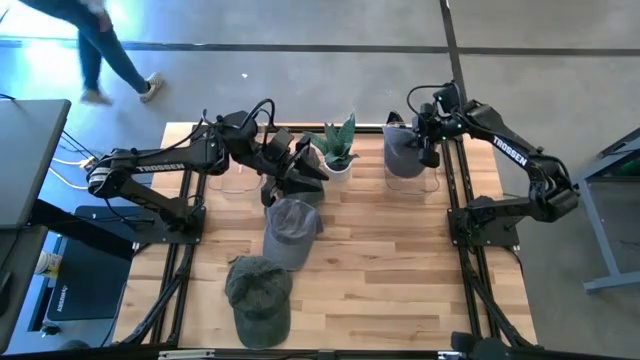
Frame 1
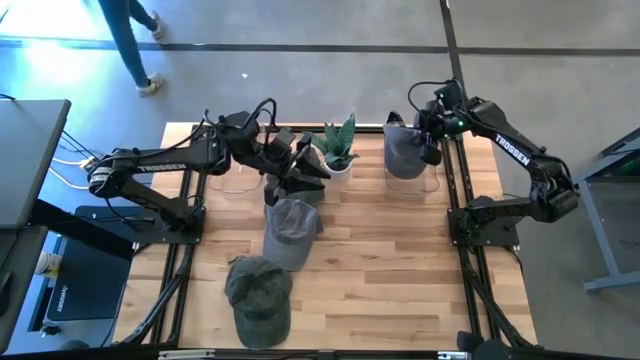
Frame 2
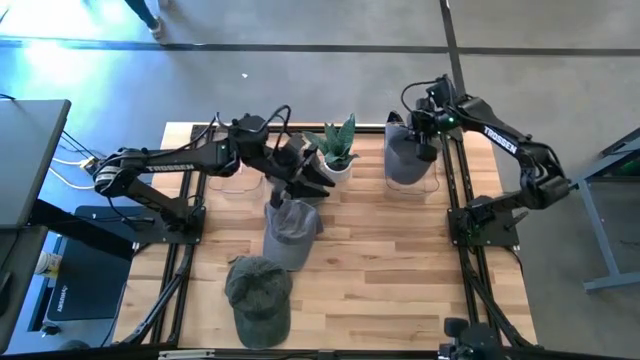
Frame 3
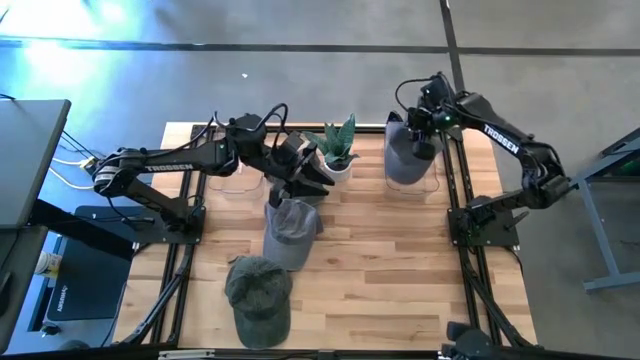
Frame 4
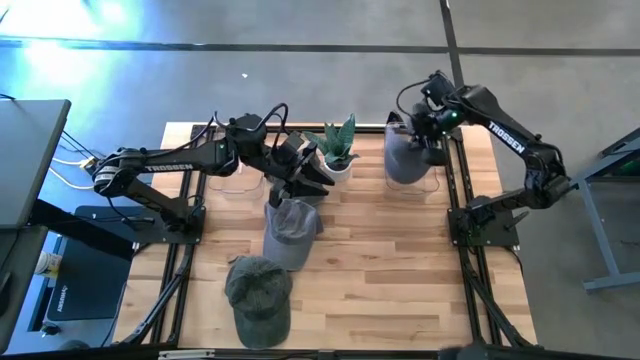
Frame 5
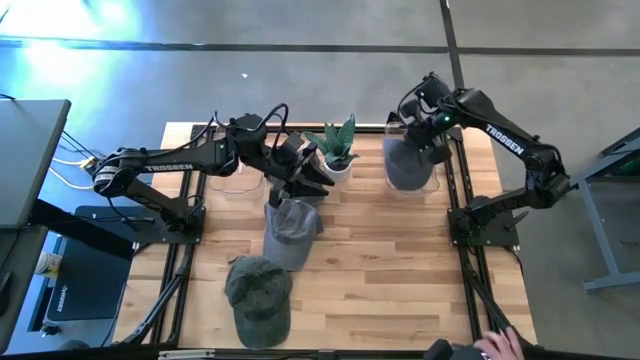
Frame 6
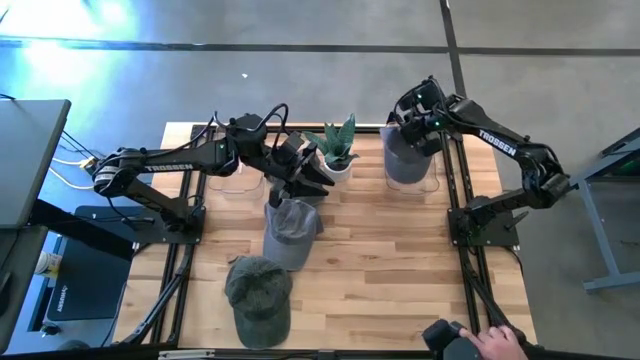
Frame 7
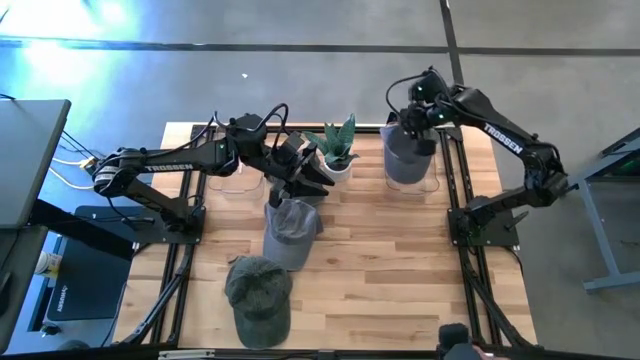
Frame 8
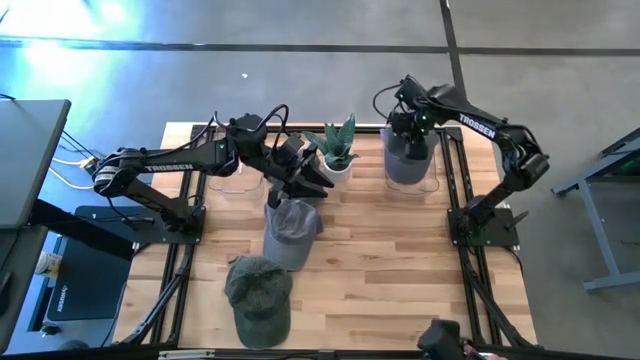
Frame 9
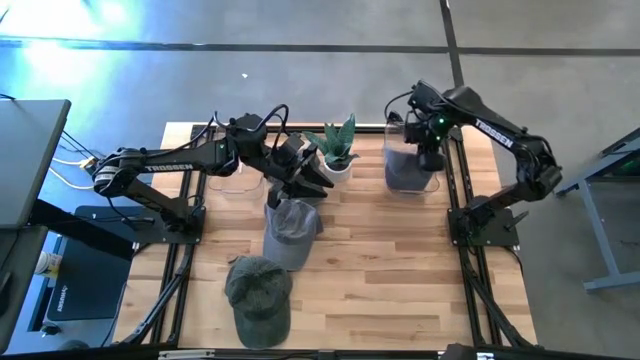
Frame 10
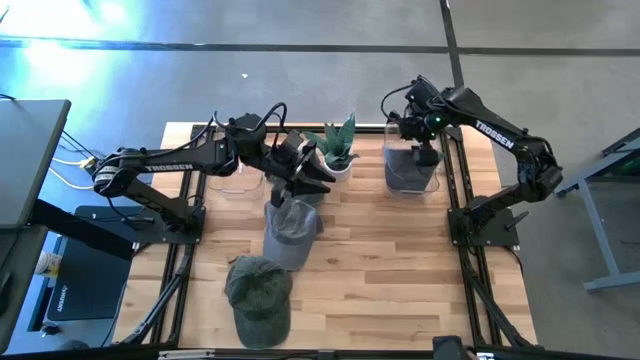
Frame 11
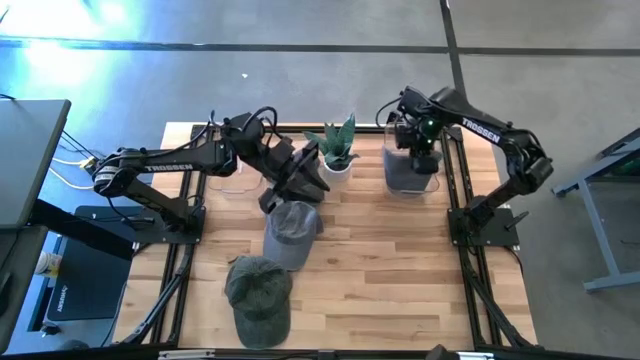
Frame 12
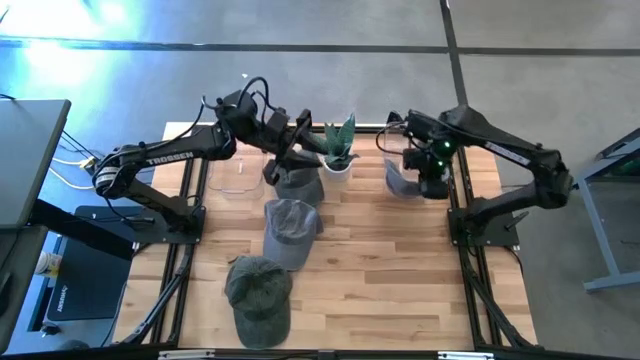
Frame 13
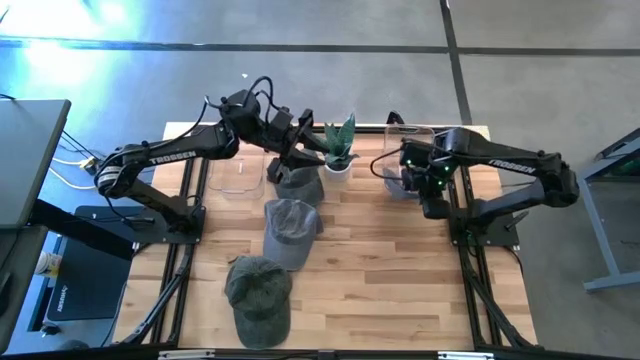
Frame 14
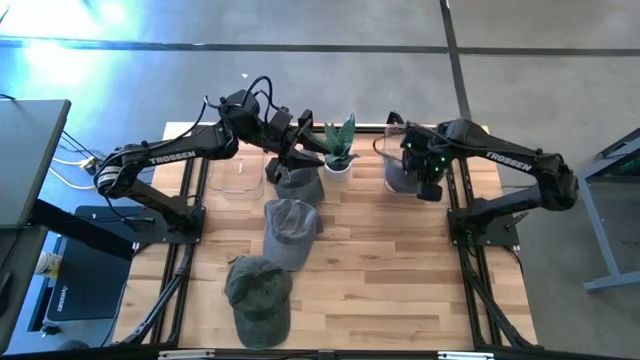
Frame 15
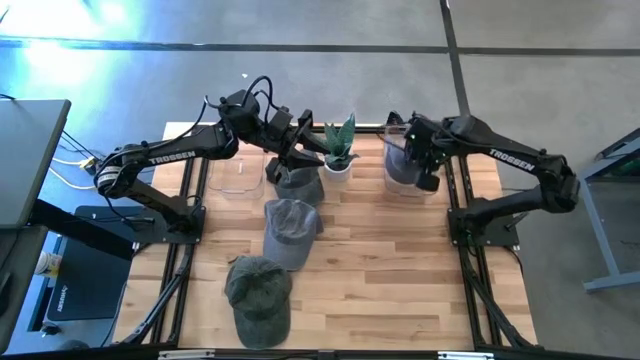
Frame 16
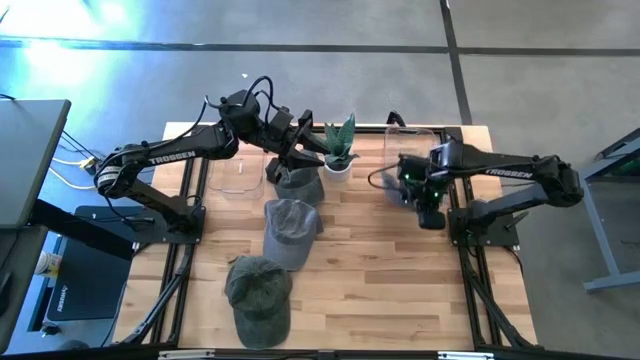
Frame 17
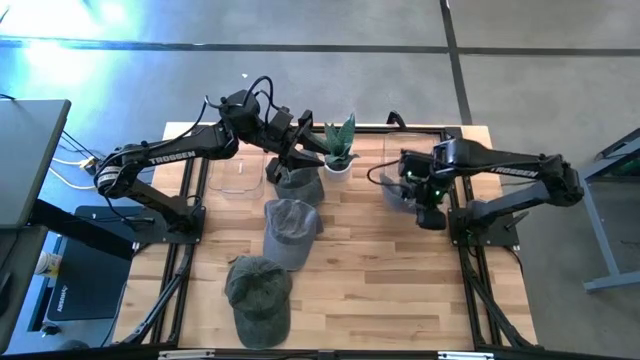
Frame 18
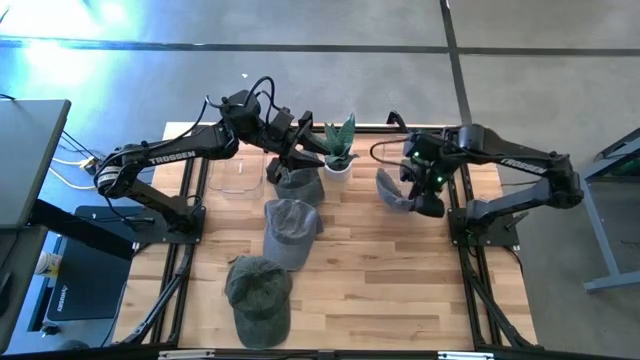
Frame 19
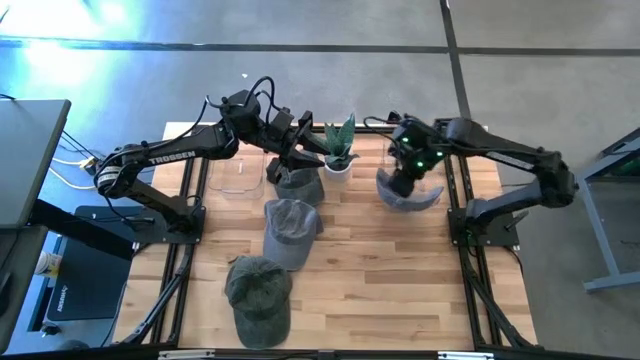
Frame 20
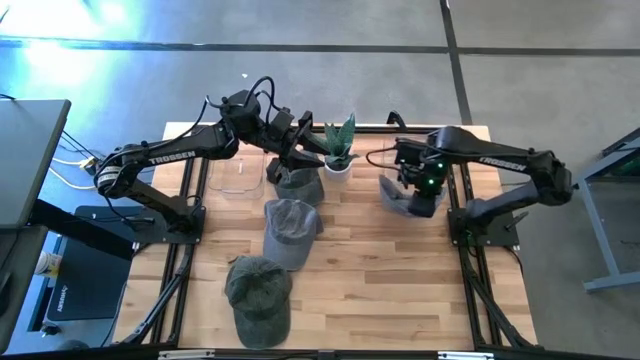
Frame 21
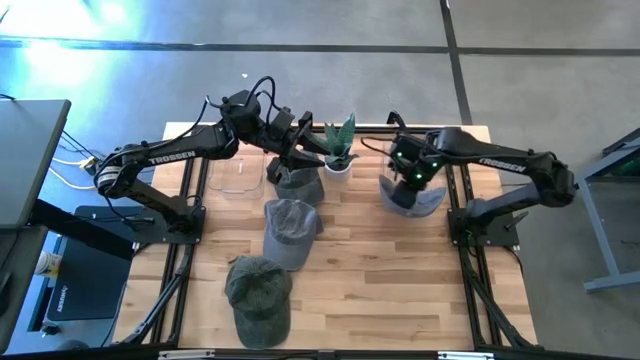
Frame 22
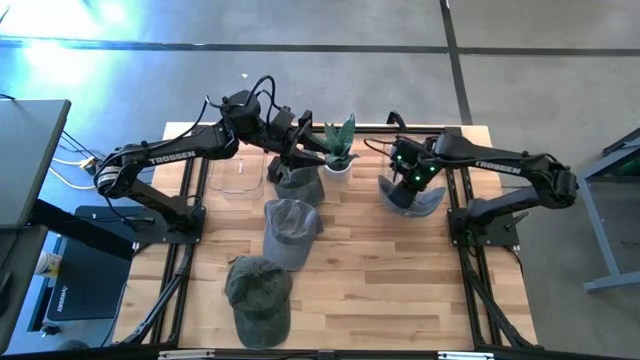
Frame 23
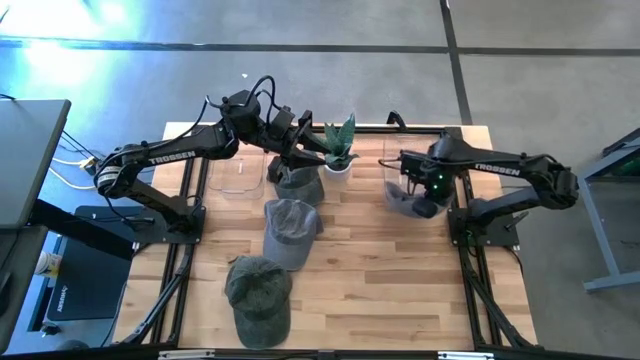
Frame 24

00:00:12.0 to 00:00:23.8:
Task: Pick & Place hat
Adjust the gray cap into the right bin

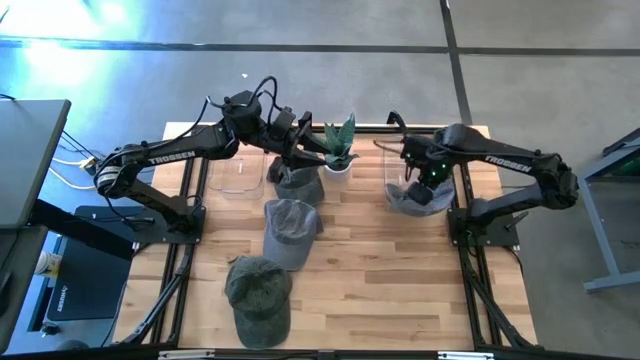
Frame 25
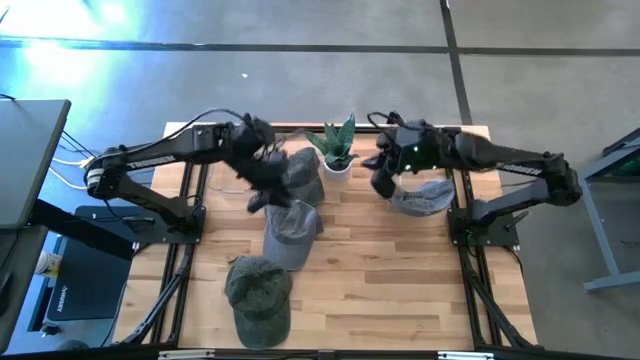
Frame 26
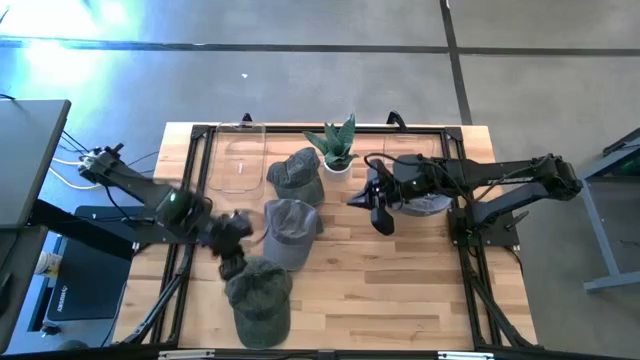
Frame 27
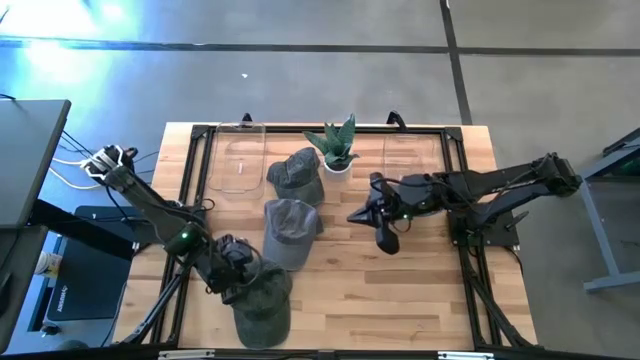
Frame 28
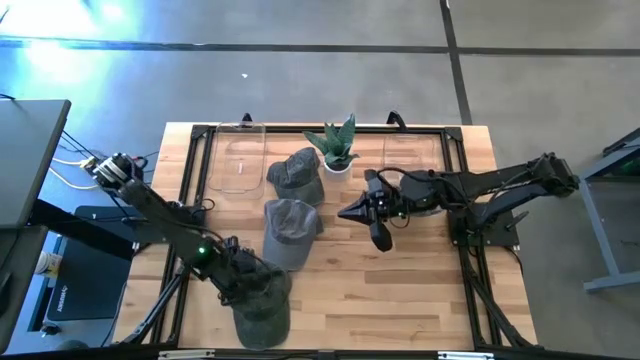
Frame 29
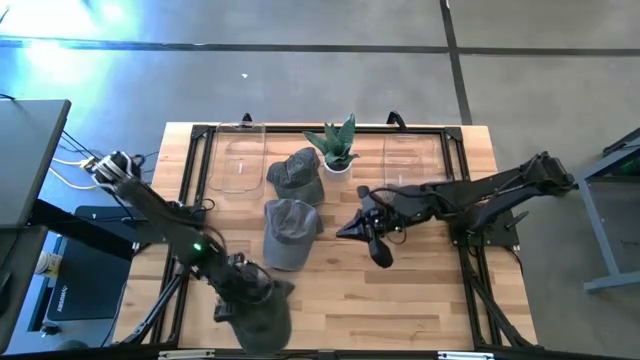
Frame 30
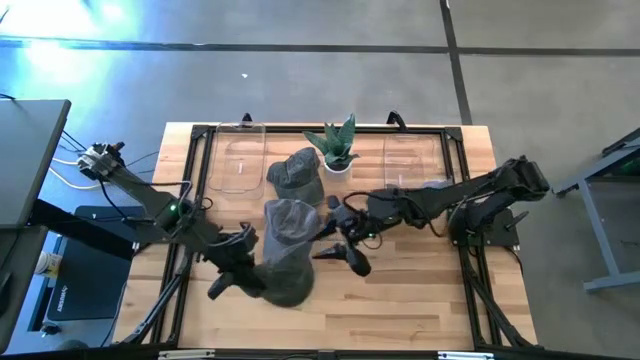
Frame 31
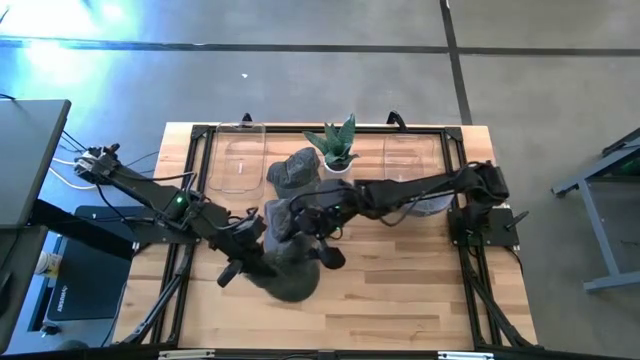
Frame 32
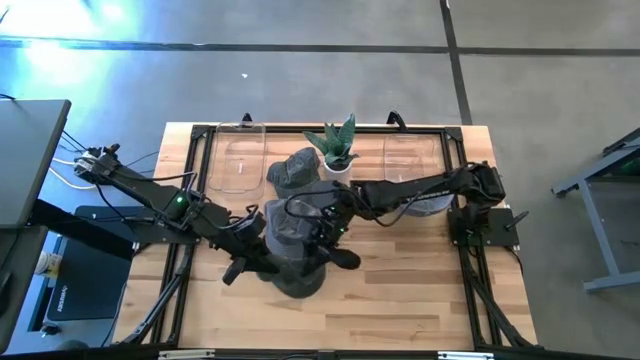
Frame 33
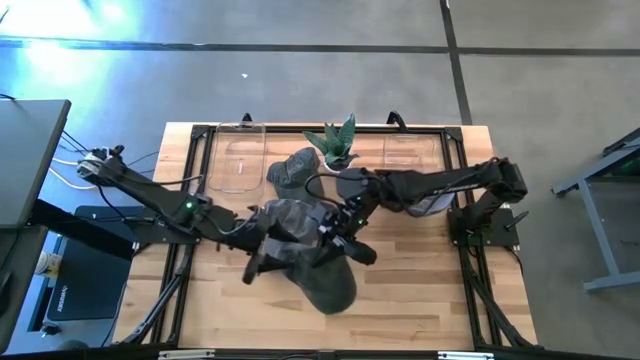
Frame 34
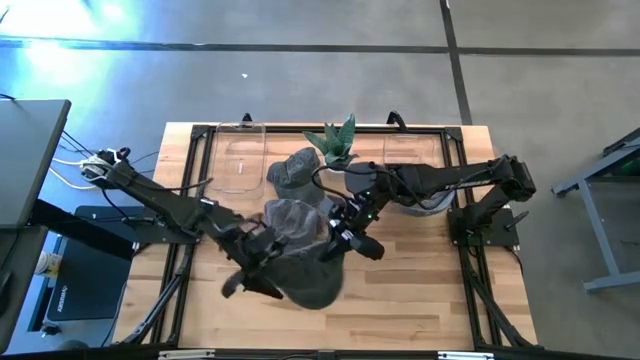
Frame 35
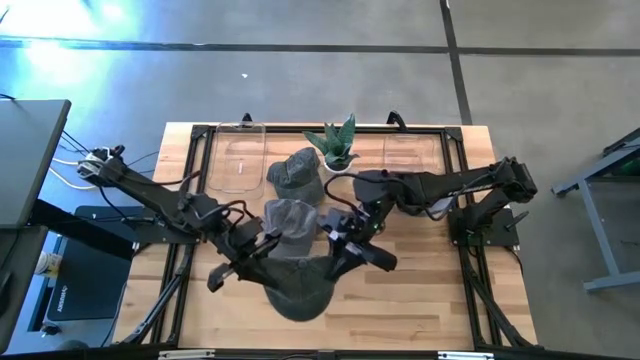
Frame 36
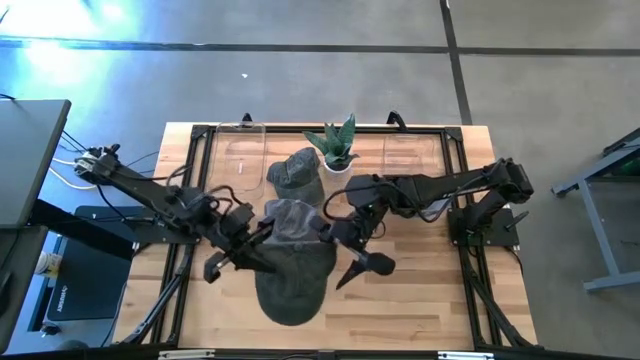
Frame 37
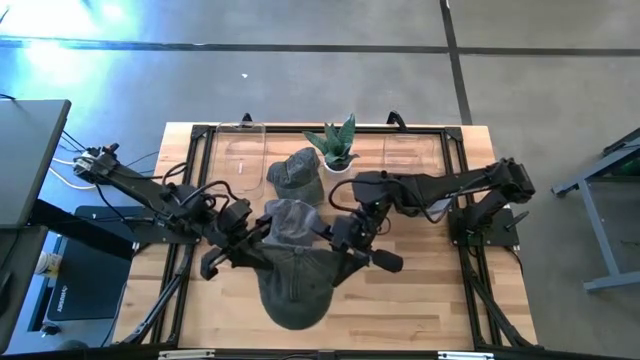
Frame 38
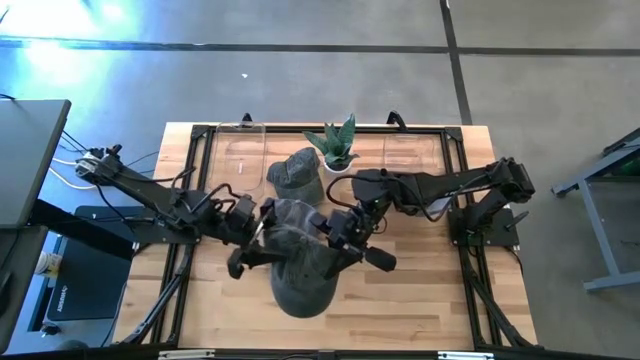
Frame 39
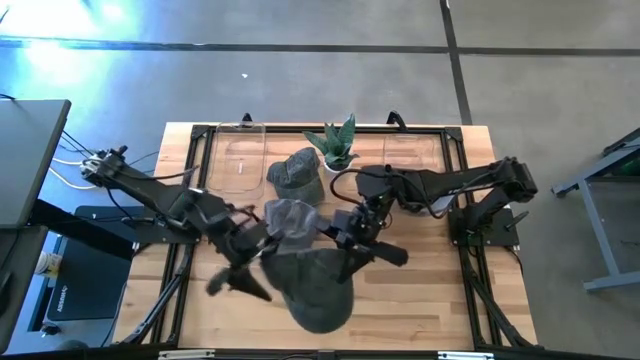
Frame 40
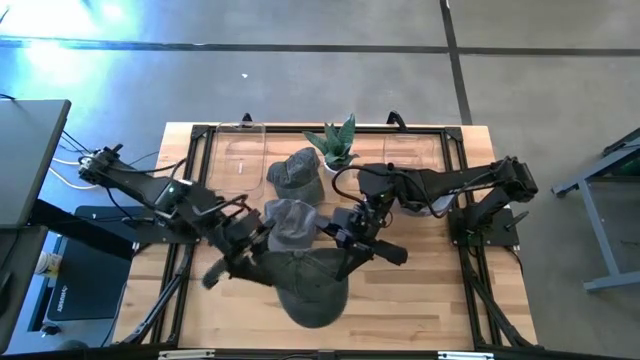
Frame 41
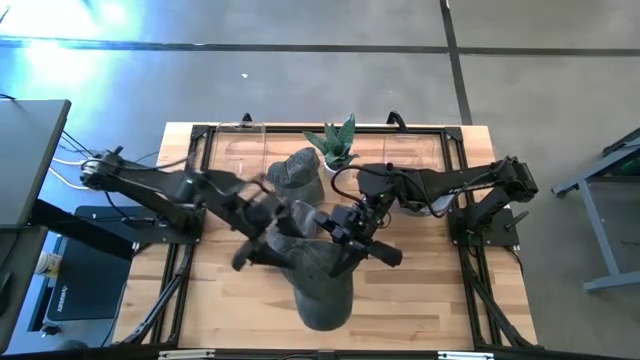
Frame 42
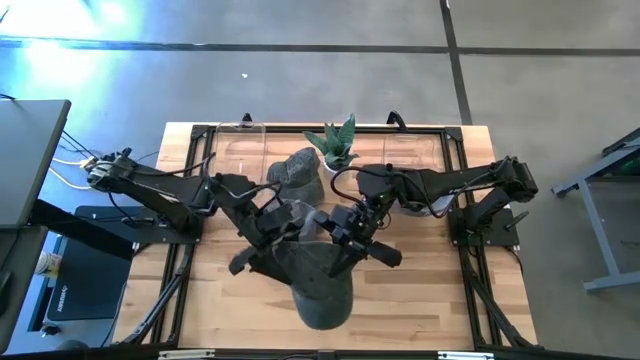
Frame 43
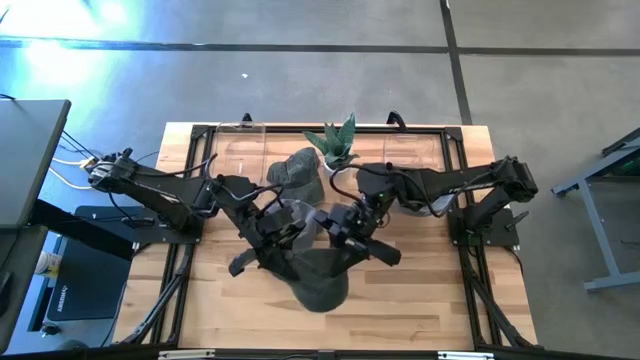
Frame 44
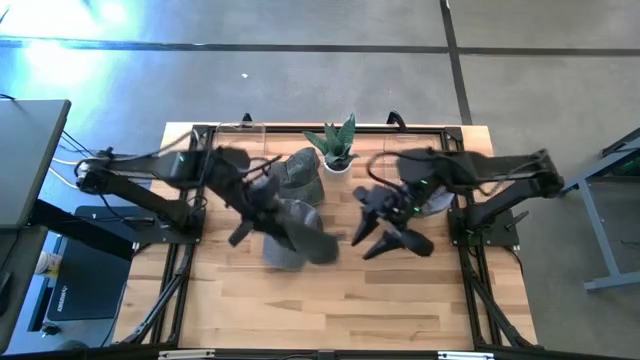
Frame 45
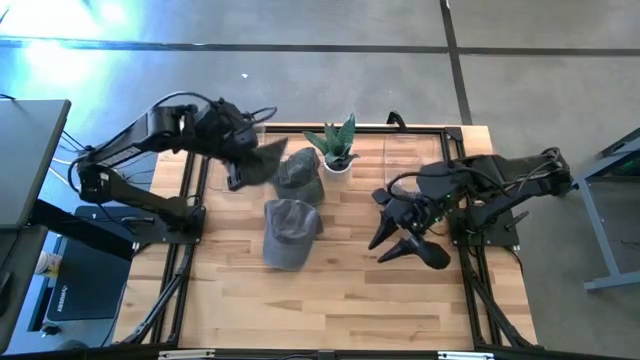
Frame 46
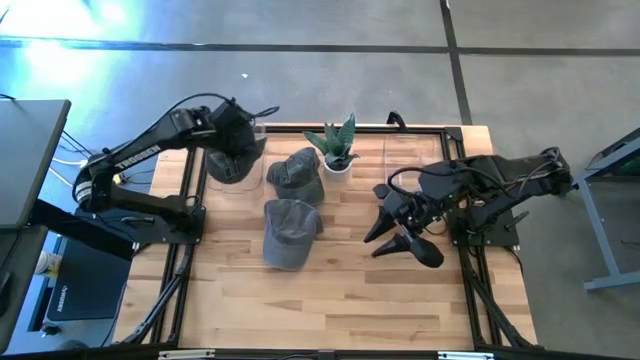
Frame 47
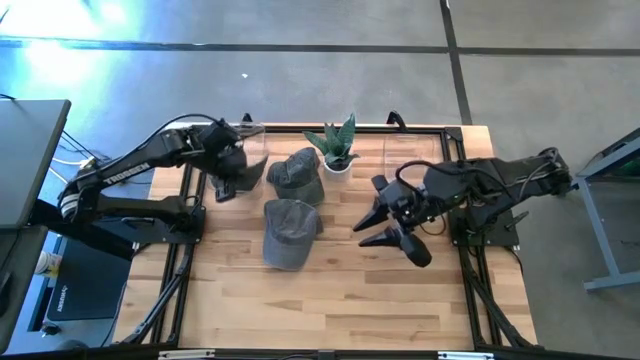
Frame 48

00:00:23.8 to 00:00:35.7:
Put the bottom green cap into the left bin
